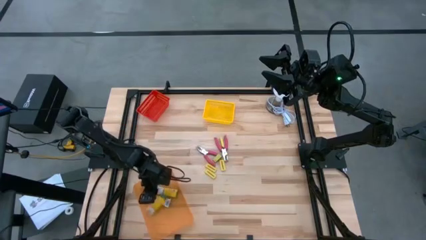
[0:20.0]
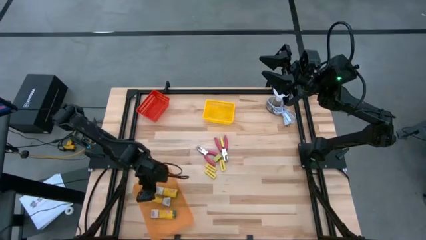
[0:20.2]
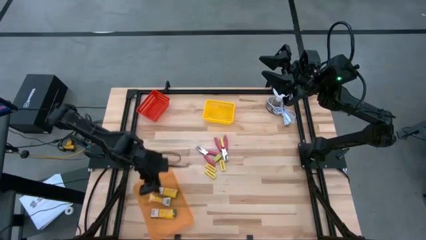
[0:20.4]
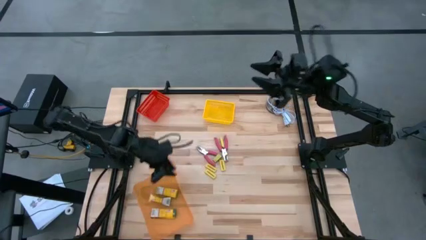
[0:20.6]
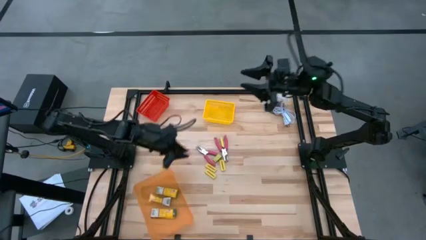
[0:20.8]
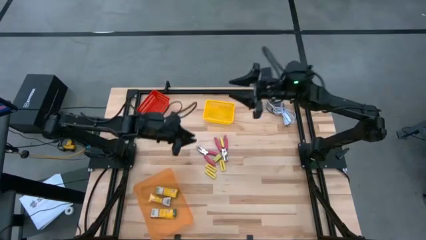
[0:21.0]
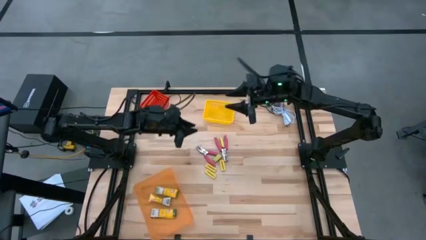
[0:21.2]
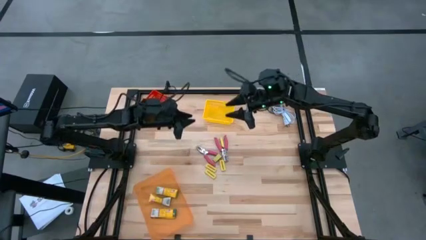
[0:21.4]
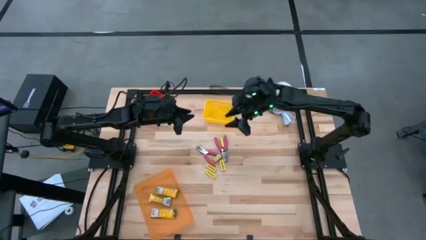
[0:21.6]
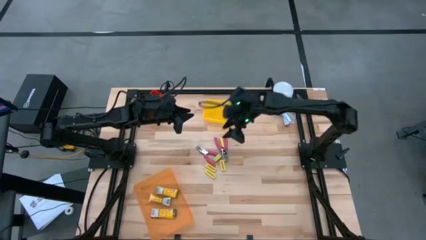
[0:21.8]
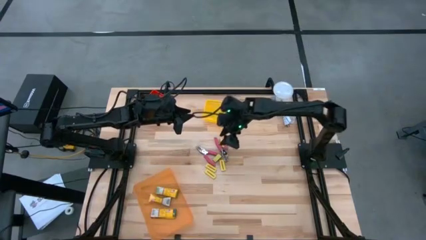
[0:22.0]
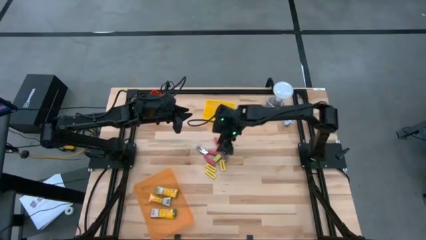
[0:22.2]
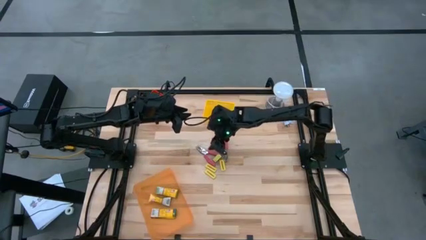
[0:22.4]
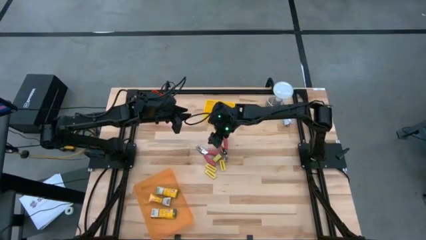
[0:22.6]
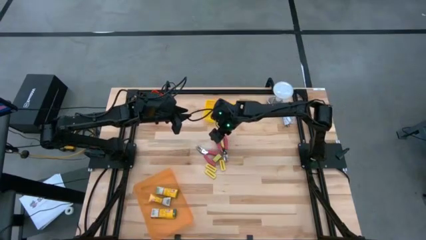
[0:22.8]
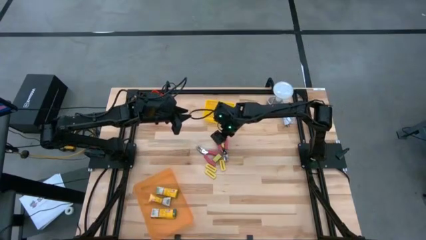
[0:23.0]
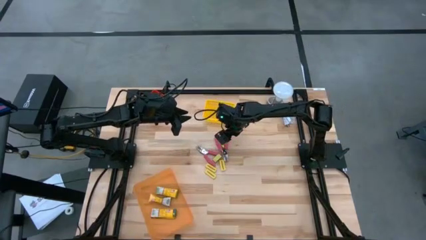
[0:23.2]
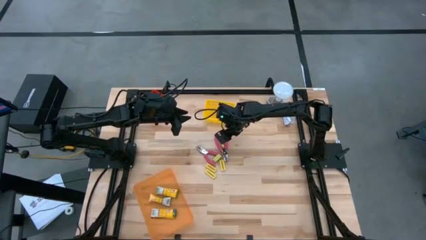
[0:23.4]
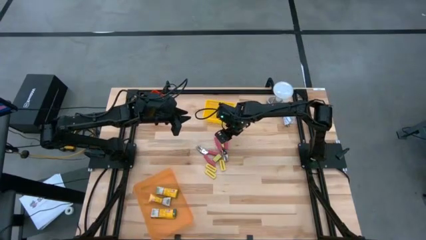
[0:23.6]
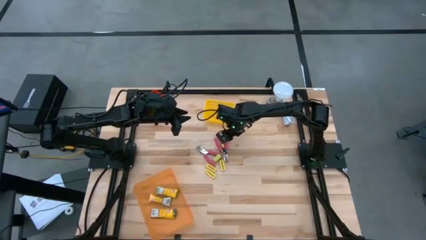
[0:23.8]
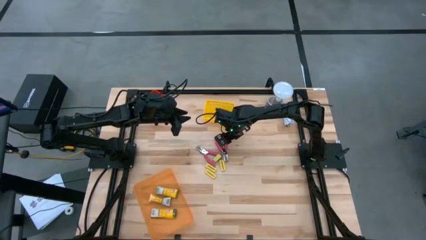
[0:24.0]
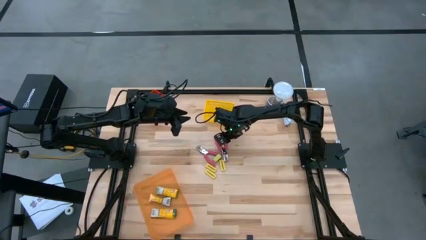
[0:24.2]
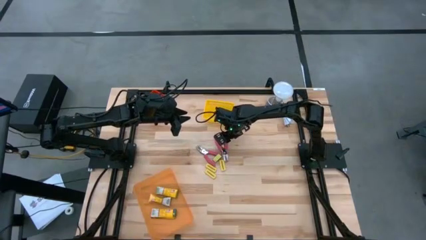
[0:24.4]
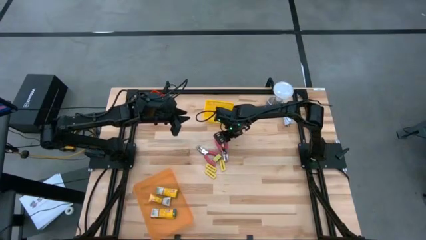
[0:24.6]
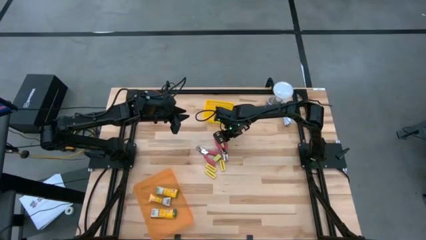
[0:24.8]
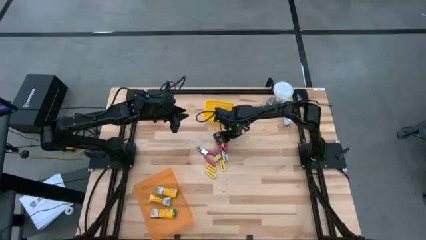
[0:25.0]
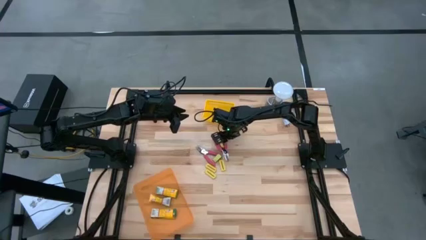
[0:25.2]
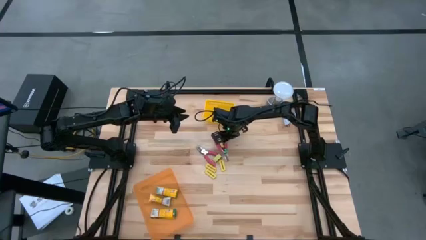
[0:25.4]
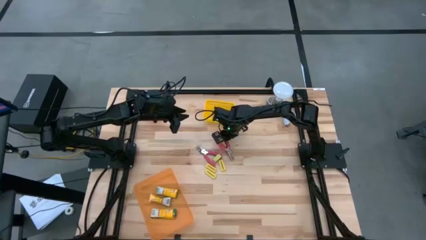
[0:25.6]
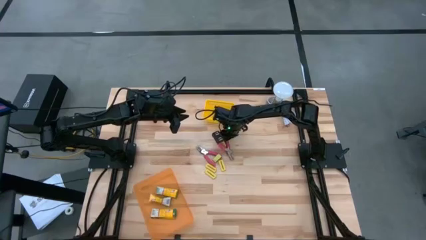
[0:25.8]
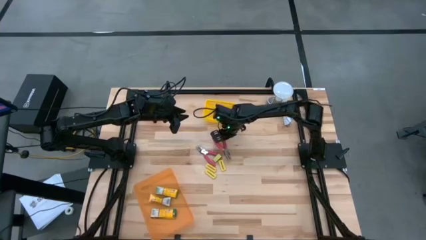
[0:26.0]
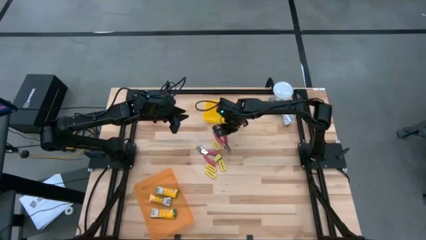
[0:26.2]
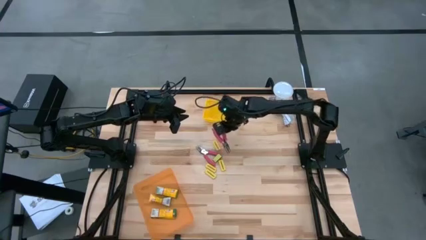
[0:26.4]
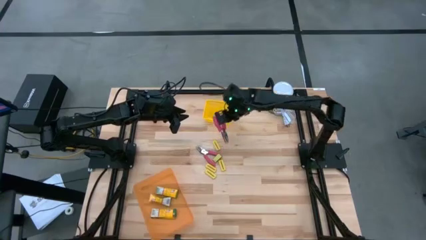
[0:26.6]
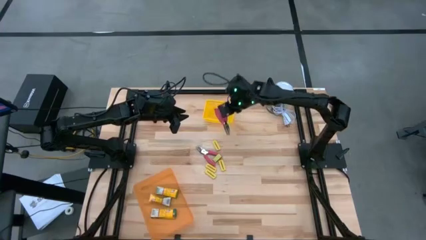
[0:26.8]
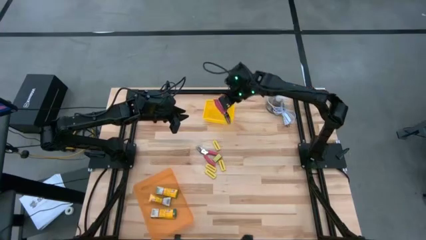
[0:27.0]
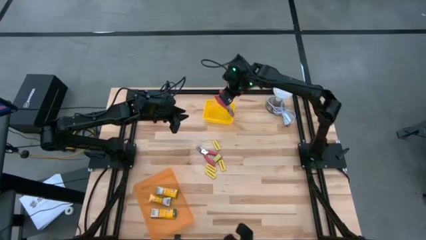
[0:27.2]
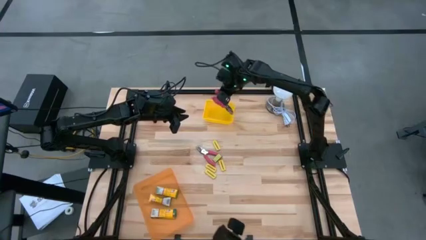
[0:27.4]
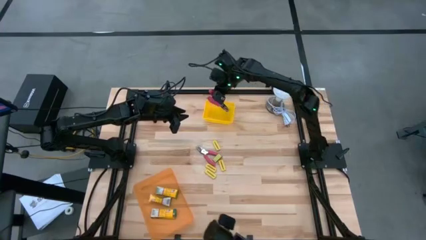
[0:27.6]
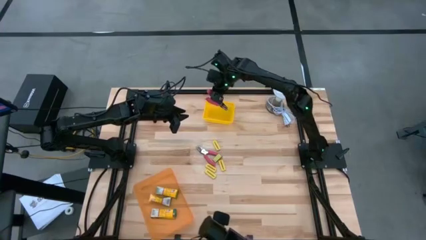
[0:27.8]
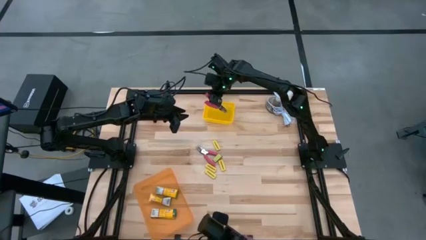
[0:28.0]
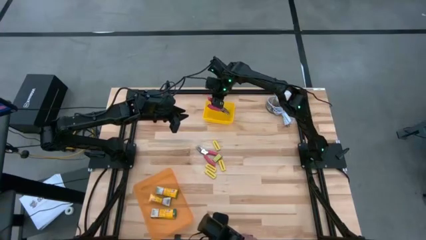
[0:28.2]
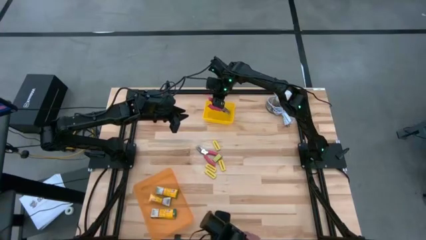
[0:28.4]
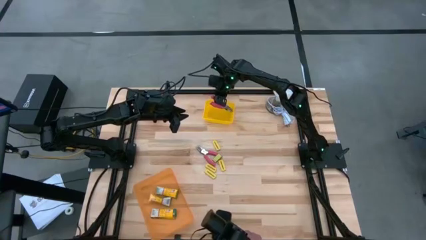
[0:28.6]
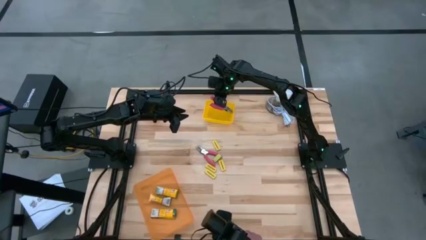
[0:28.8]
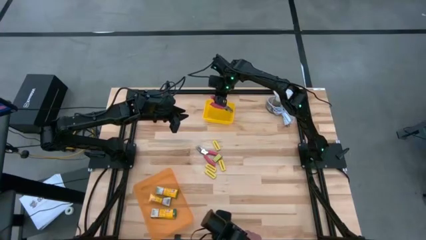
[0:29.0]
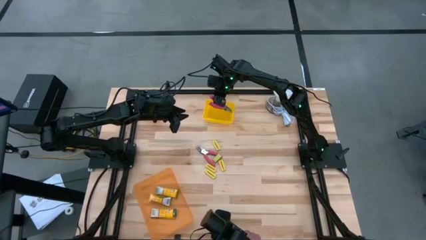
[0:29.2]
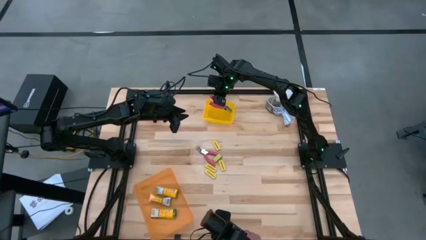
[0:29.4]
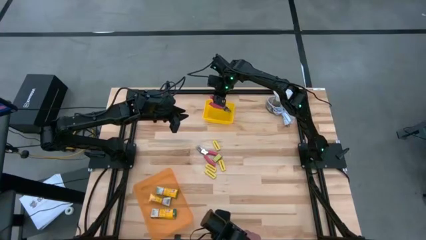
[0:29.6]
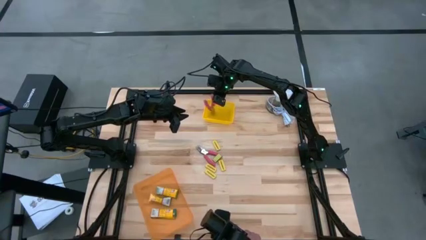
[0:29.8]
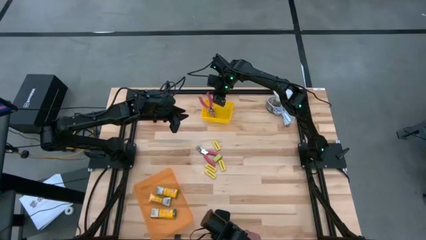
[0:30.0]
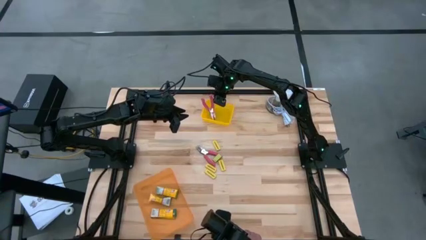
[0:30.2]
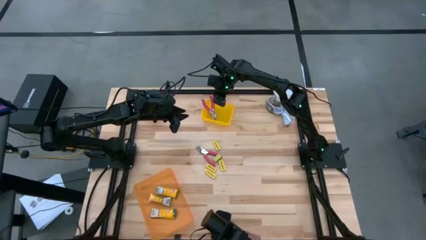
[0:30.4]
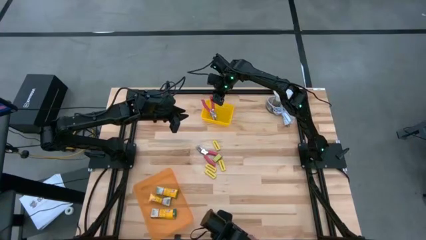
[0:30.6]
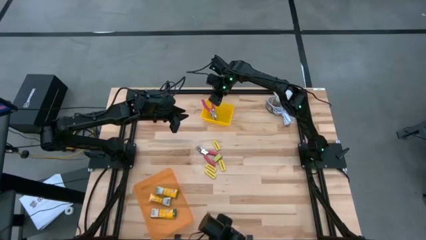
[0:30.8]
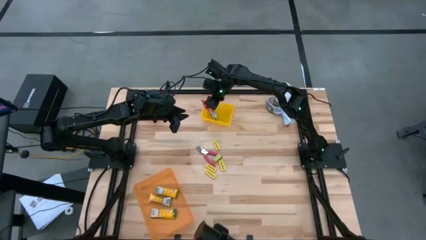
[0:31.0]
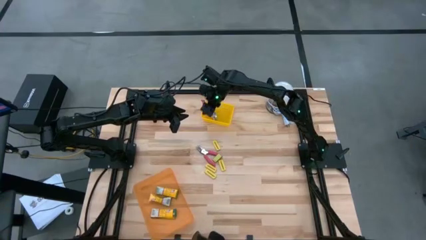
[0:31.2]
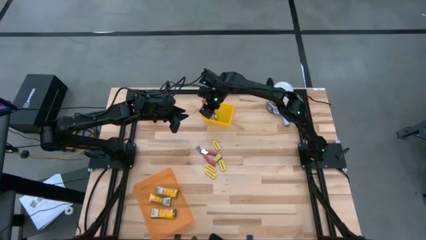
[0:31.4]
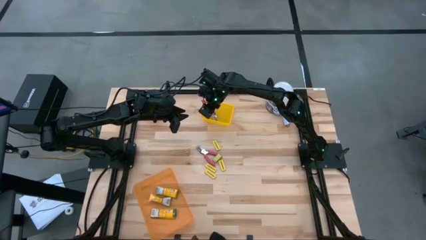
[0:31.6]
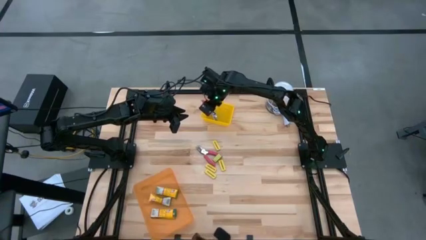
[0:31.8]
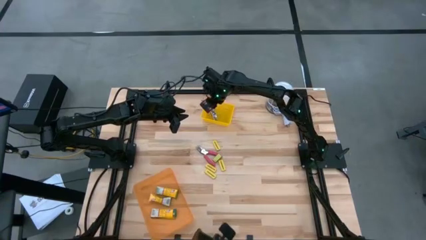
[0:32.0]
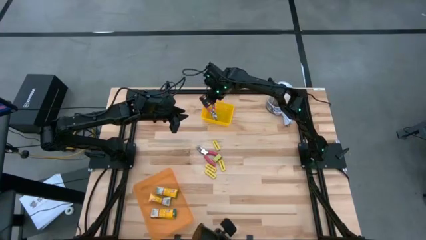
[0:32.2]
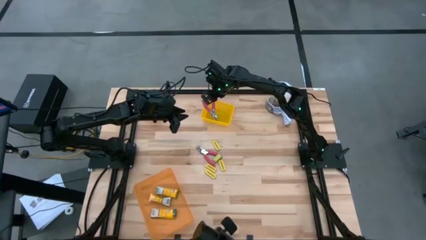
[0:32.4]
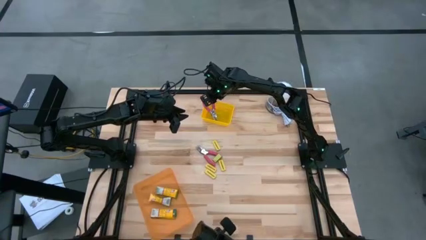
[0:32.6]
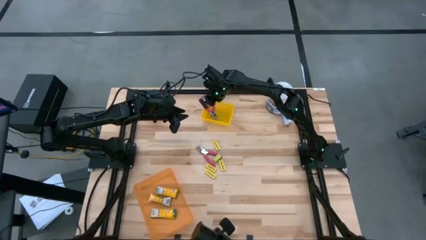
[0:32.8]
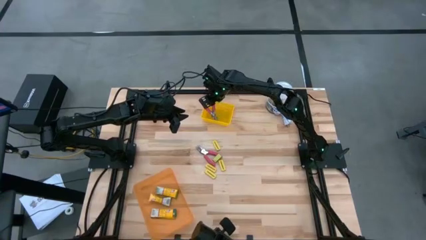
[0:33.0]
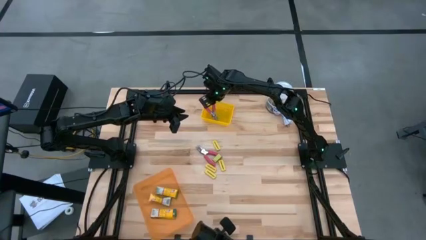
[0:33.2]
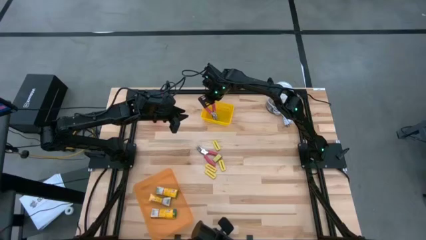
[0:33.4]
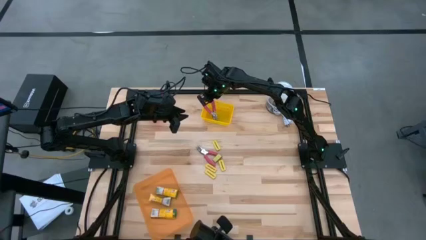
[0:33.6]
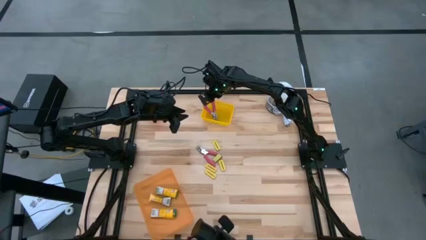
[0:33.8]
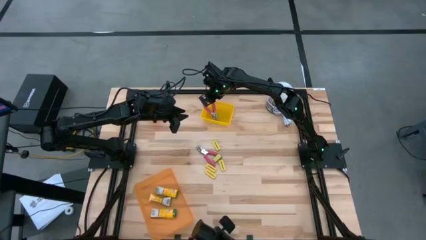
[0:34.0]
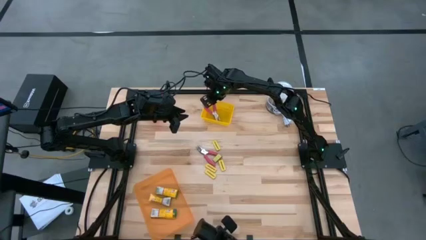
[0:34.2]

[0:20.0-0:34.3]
Task: Pick & Place School Supplies
Put the pink hole puncher into the yellow bin

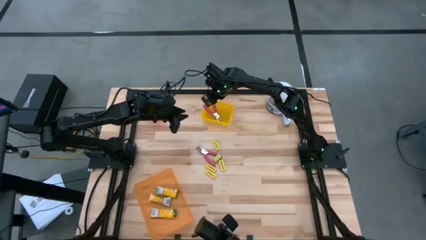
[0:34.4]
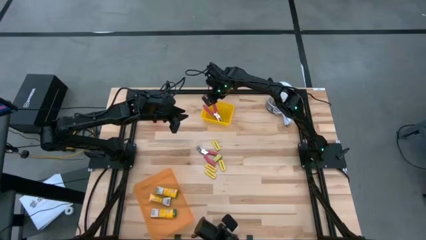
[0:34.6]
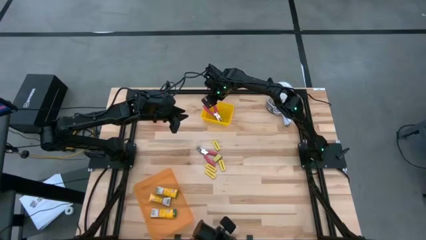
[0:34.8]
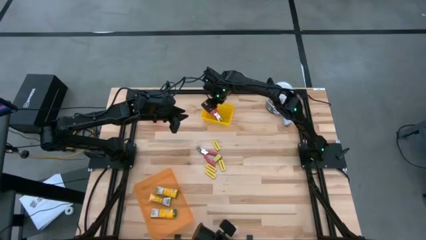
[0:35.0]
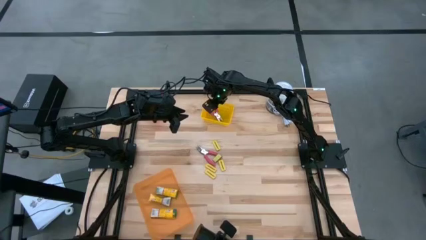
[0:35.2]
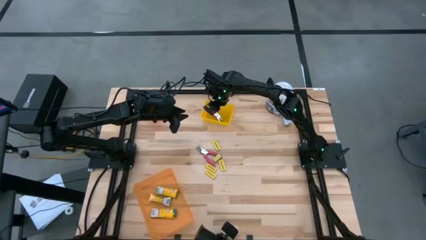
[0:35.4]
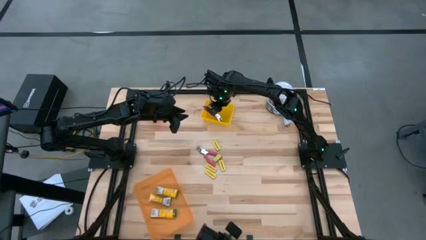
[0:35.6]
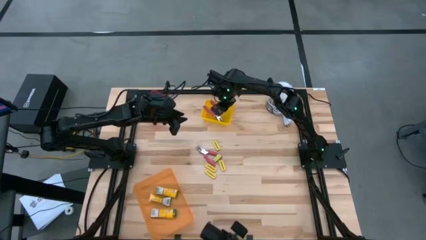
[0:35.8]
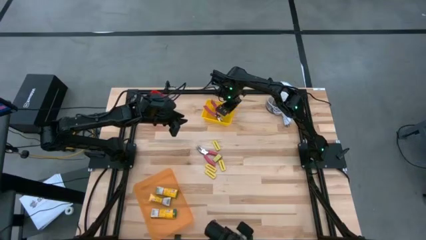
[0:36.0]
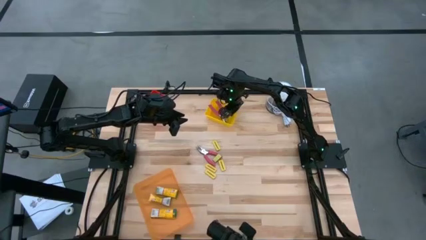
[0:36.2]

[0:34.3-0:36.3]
Adjust the yellow bin
